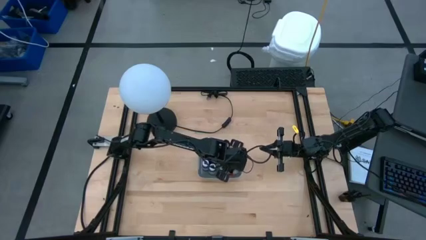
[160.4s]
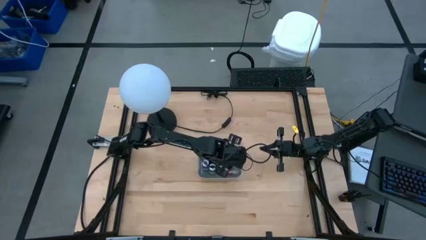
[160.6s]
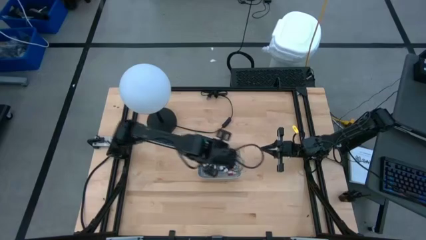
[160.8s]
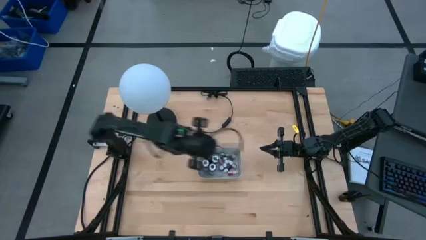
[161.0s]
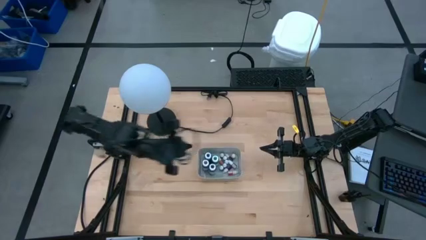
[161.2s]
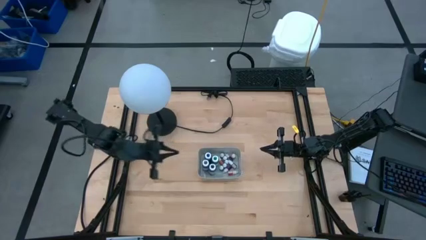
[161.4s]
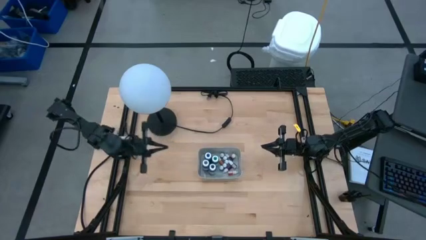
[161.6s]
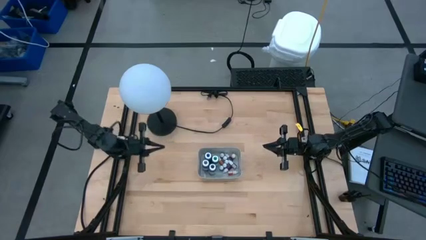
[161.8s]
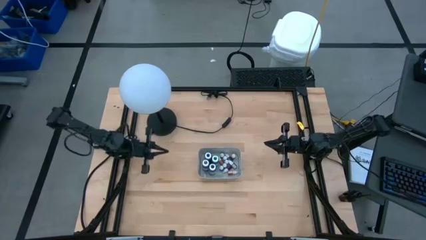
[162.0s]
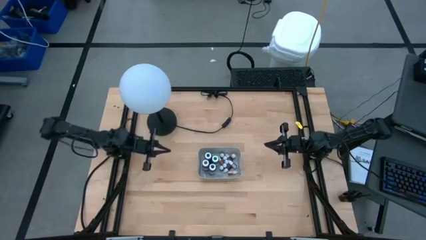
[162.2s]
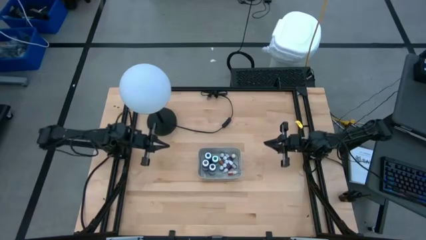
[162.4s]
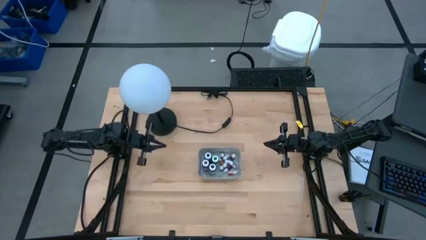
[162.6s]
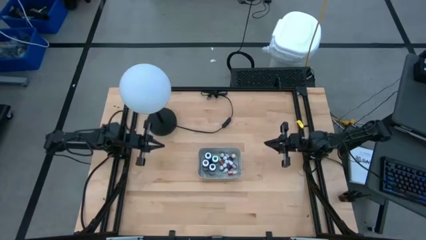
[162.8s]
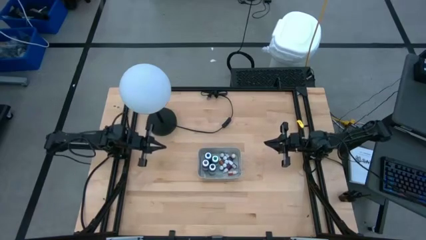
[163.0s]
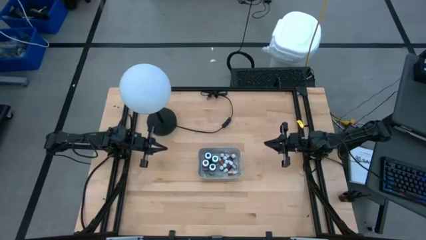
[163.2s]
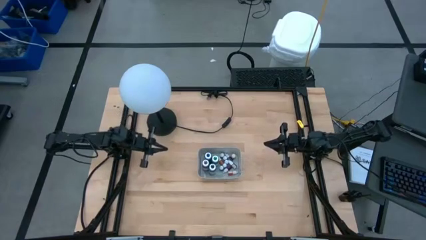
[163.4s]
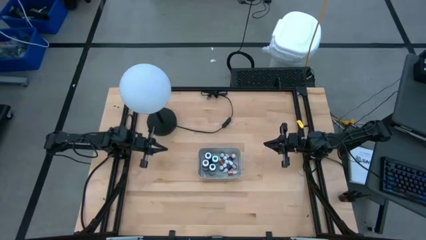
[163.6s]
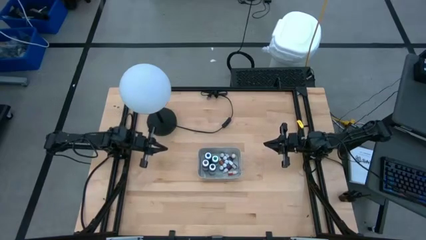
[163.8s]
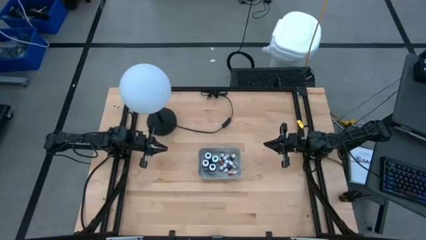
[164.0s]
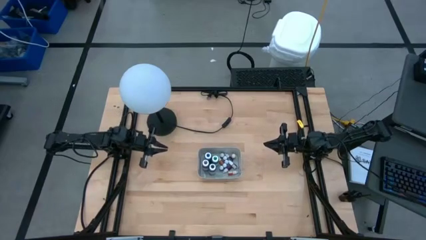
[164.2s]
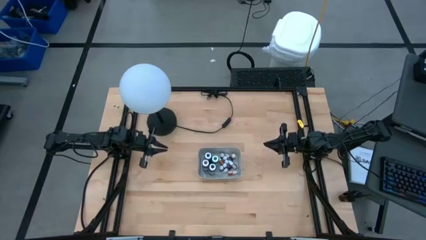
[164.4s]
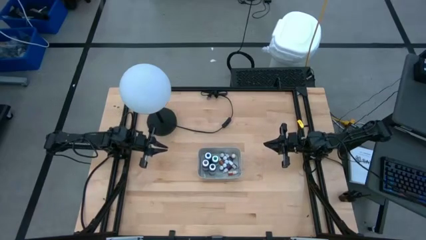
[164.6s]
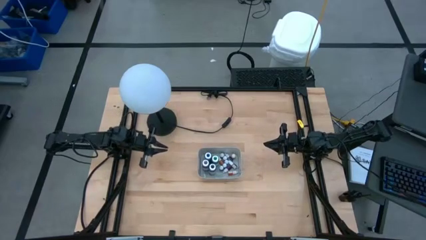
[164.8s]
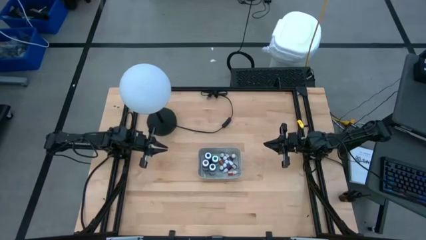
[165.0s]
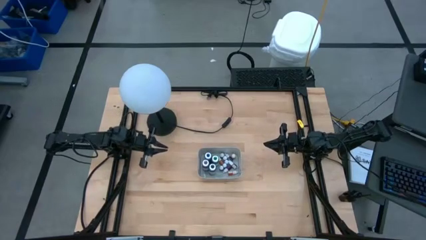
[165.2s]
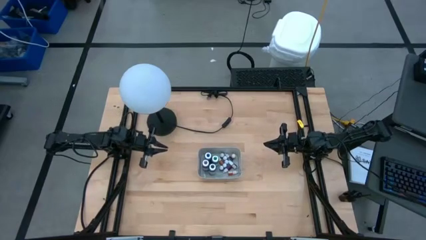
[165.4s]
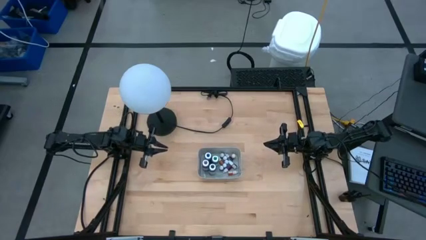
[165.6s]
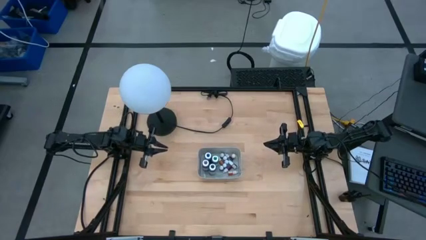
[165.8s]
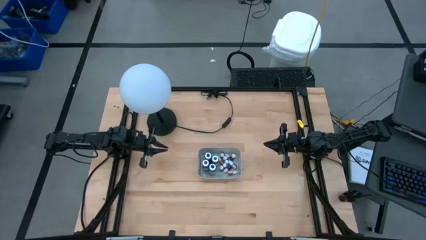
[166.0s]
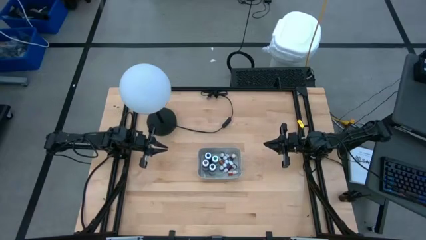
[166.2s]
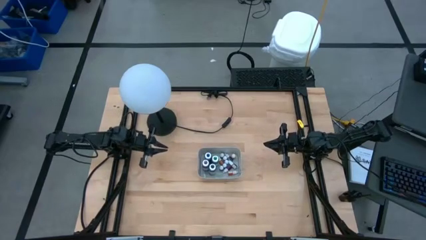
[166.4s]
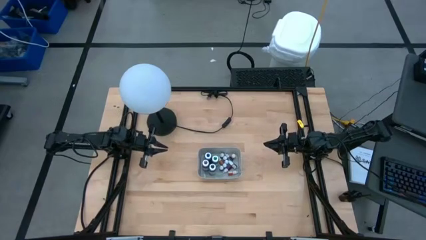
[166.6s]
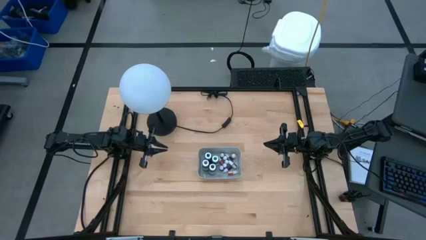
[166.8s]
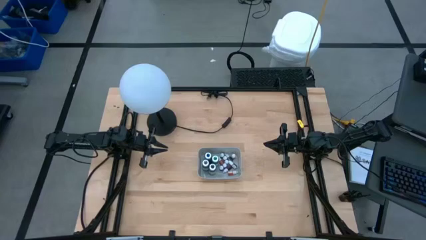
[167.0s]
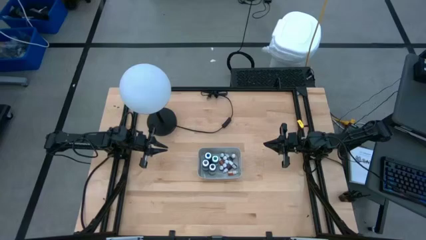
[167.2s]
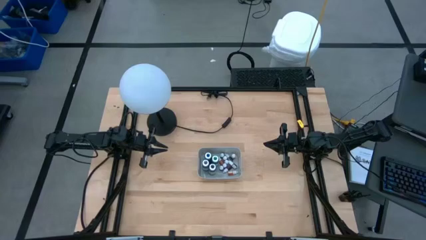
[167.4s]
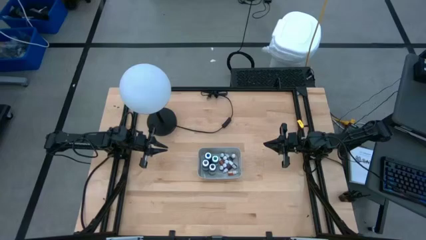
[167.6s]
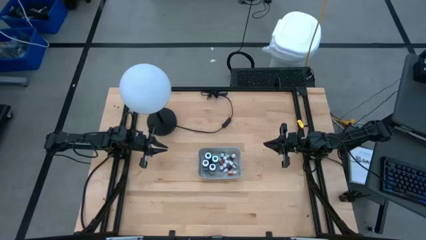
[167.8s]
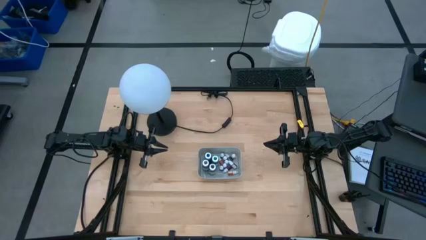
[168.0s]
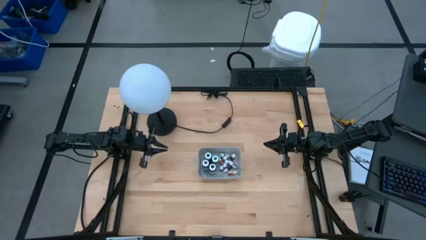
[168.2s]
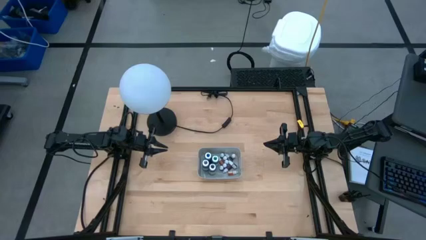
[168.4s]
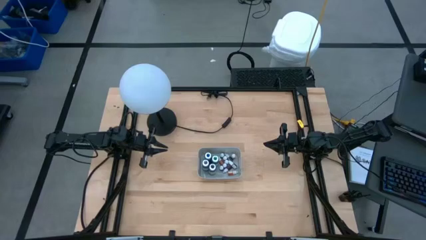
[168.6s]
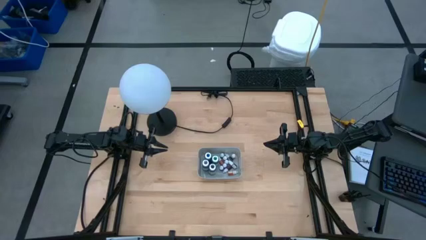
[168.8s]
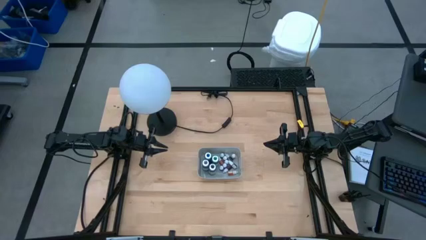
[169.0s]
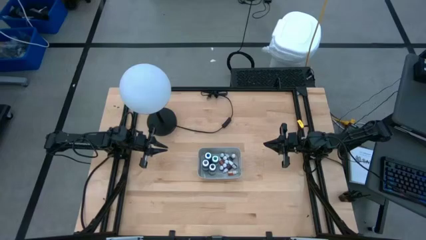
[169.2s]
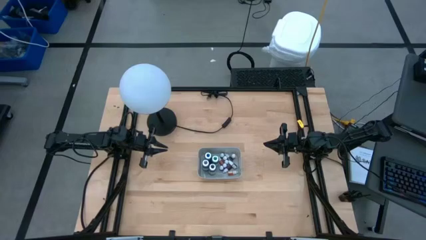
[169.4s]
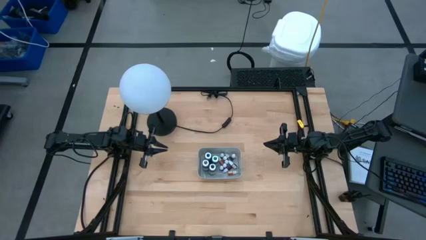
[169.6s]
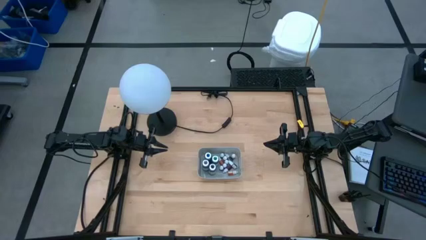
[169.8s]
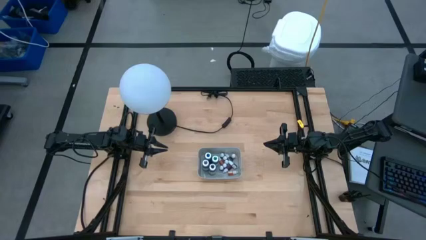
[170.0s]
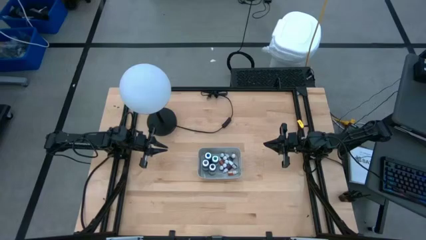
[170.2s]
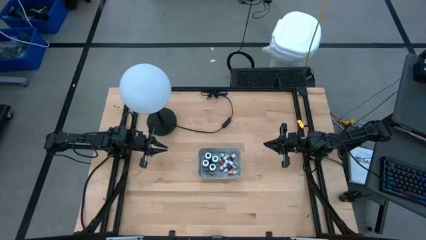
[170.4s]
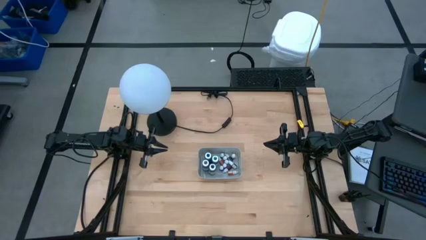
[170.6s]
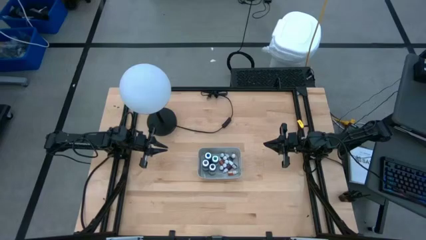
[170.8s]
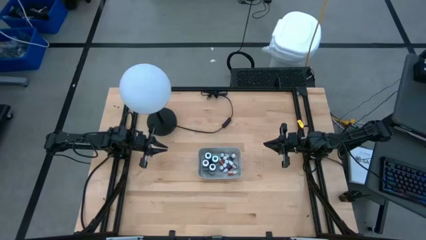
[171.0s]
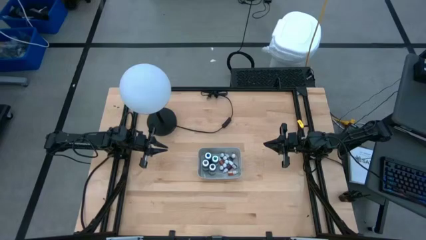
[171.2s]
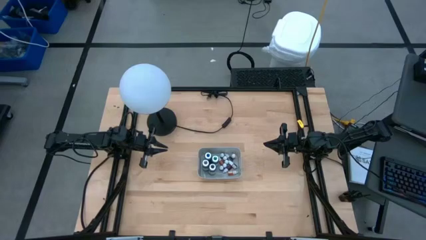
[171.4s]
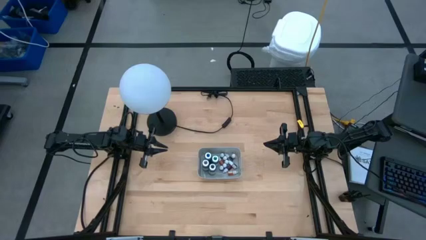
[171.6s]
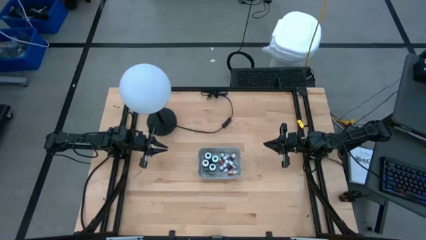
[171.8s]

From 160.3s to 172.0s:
Task: Pick & Place food coloring
Return to Home Position

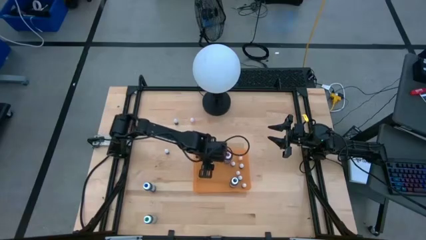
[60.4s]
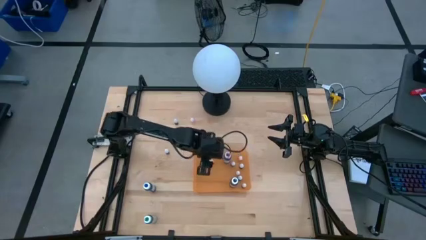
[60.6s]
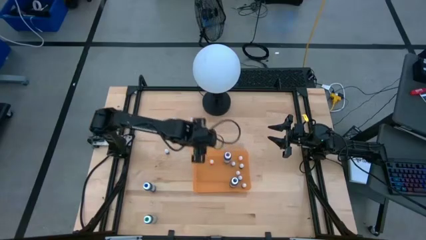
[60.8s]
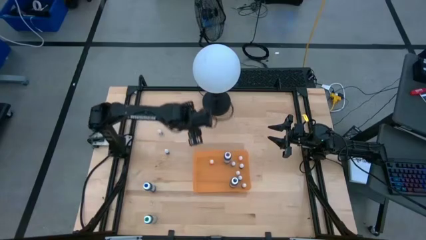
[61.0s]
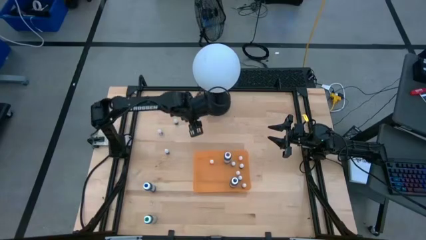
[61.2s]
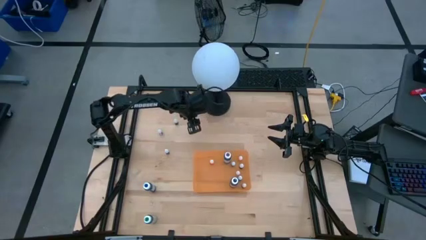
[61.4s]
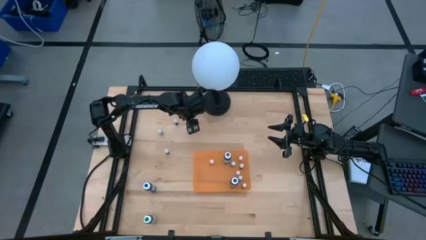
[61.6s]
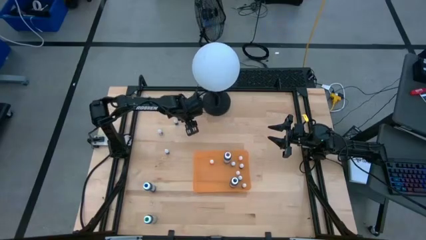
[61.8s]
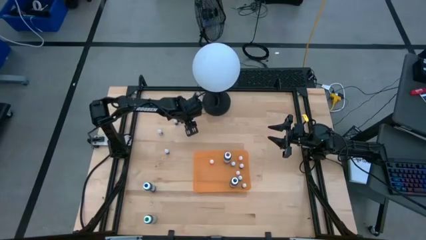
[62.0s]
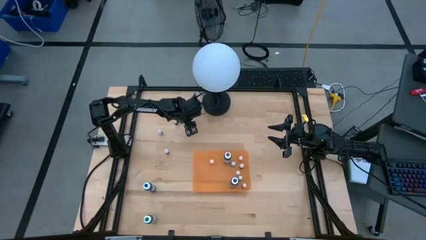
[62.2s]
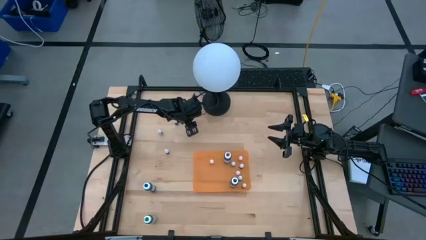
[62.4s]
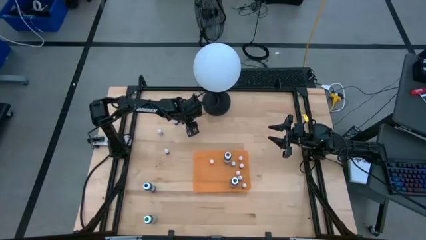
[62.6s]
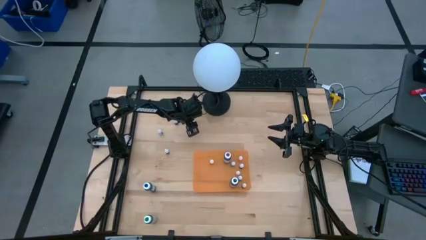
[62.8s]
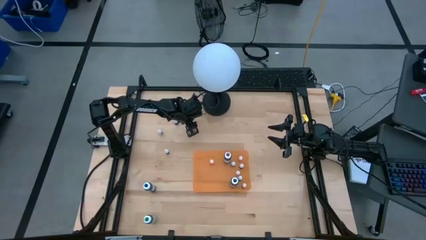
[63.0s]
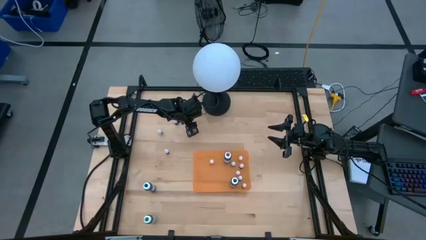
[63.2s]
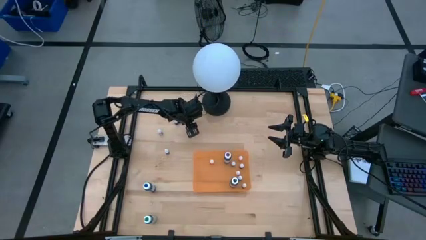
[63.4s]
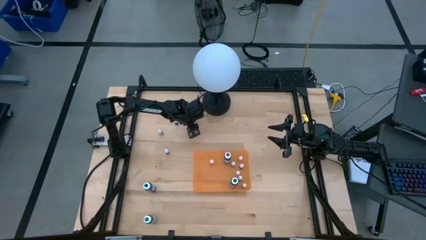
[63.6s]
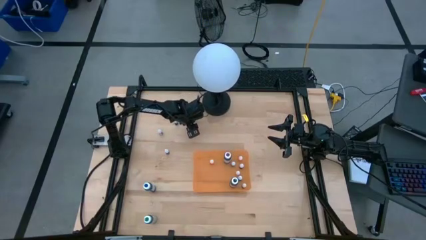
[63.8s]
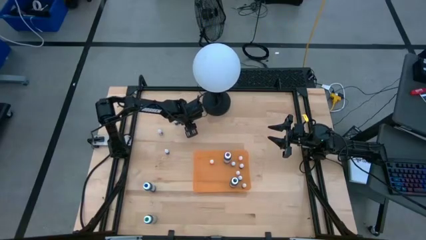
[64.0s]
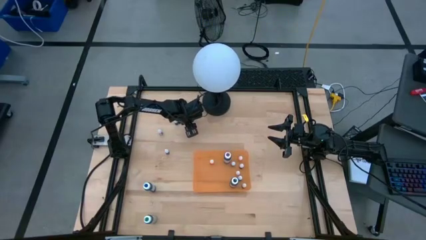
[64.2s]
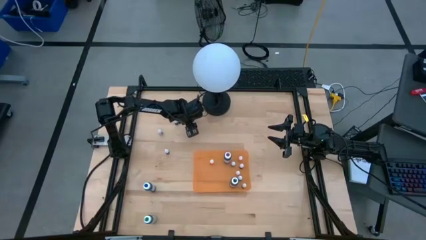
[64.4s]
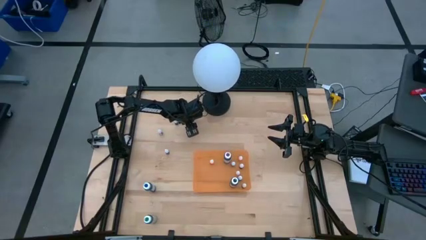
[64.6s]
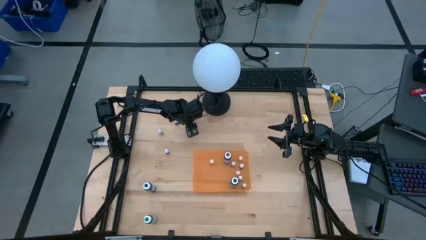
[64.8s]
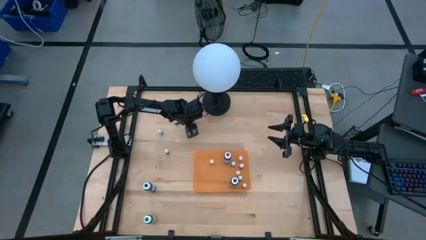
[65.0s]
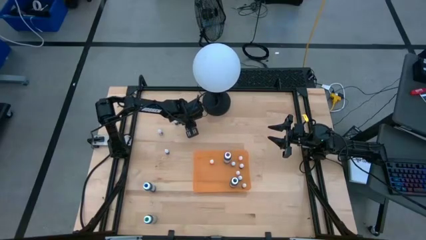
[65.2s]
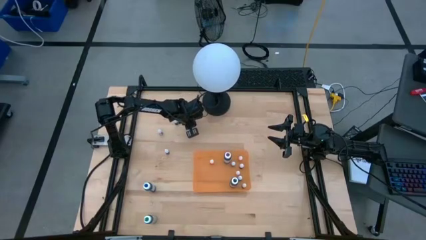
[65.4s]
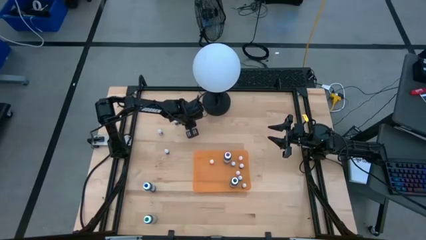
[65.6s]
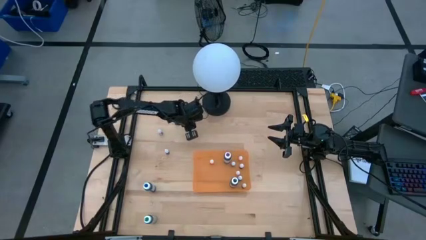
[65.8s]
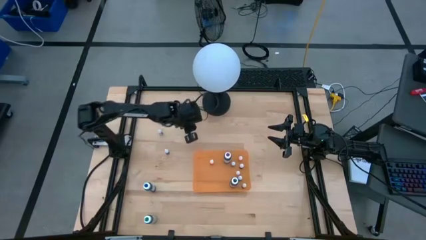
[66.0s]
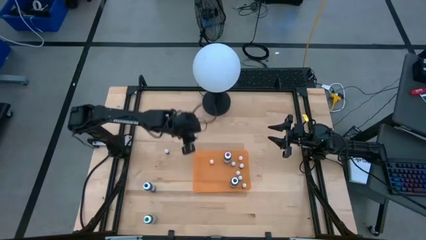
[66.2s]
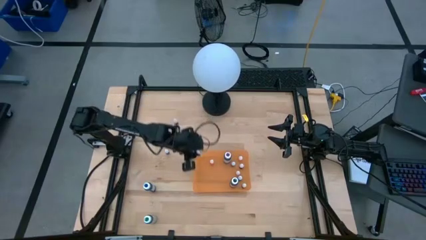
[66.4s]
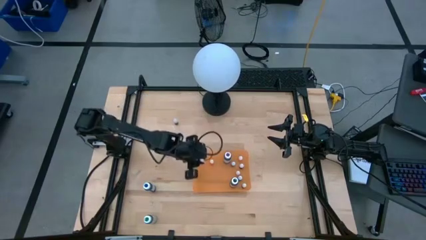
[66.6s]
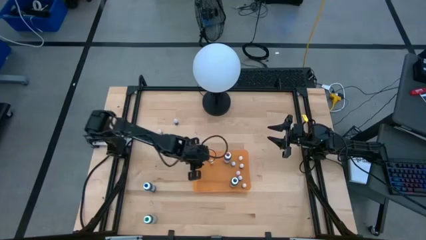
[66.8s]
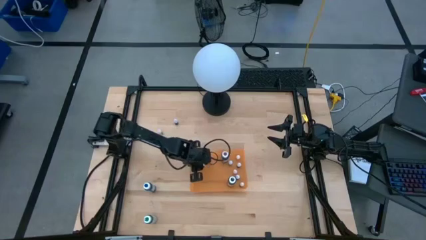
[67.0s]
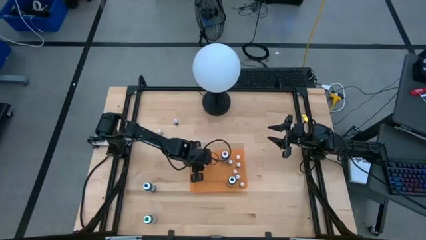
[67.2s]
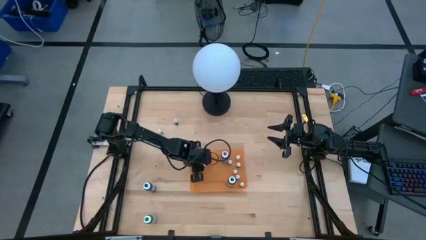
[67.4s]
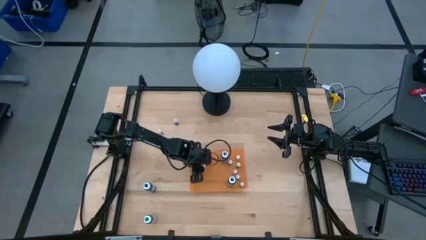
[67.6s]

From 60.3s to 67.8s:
Task: Pick & Place food coloring
Put the small orange food coloring bottle into the orange container
